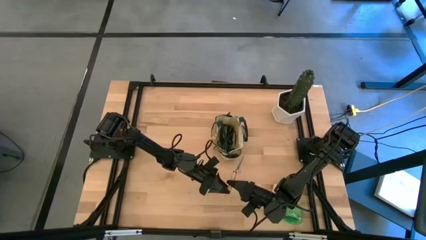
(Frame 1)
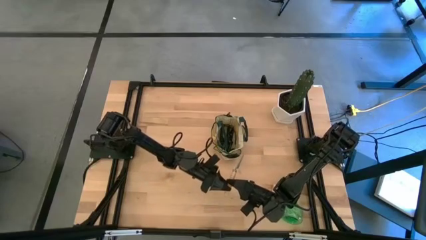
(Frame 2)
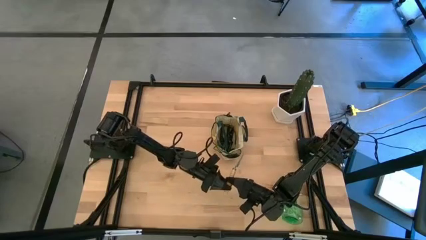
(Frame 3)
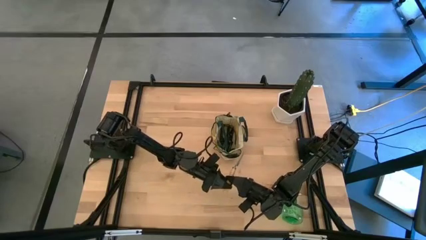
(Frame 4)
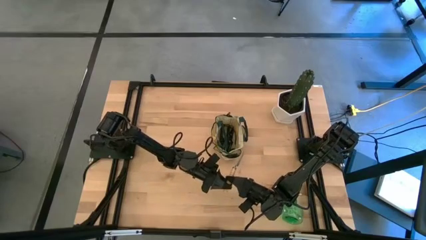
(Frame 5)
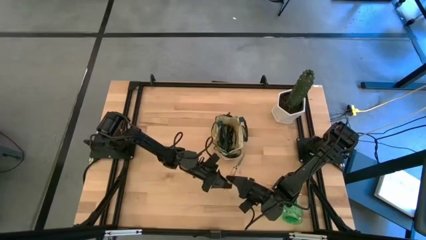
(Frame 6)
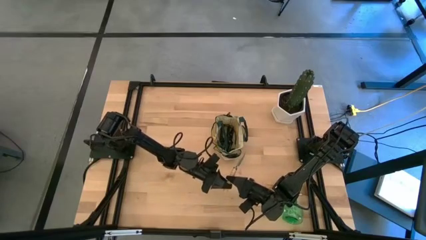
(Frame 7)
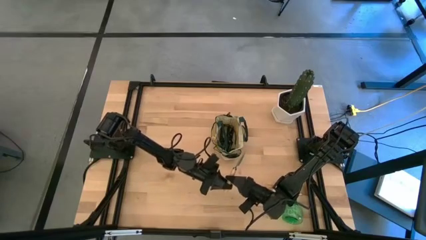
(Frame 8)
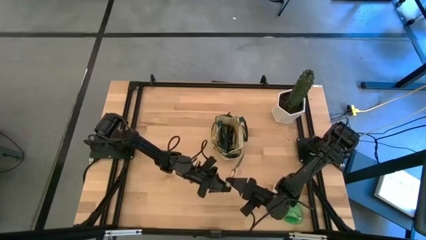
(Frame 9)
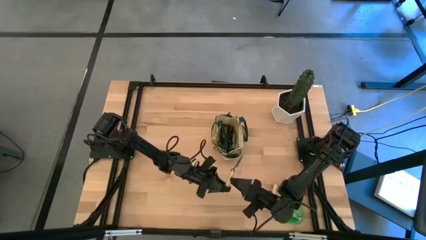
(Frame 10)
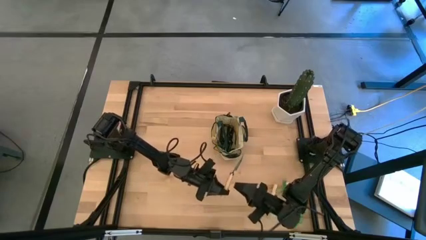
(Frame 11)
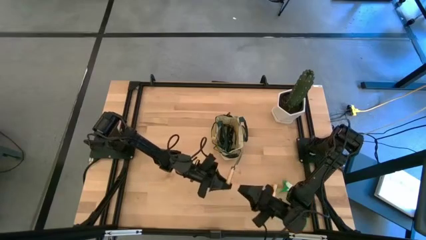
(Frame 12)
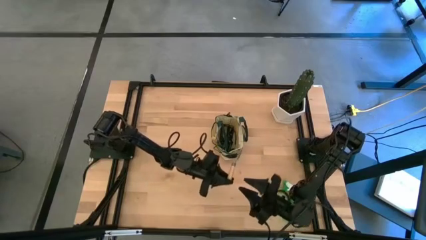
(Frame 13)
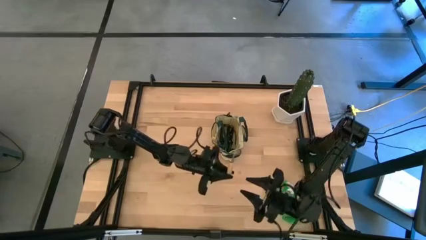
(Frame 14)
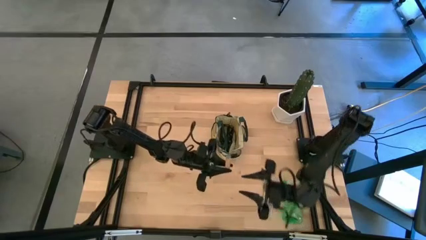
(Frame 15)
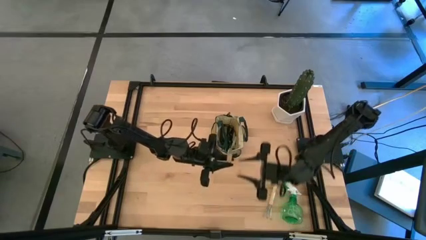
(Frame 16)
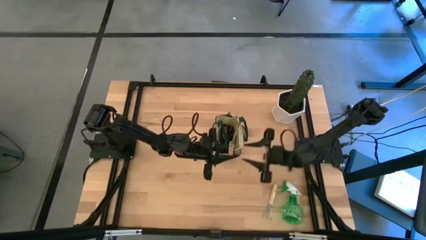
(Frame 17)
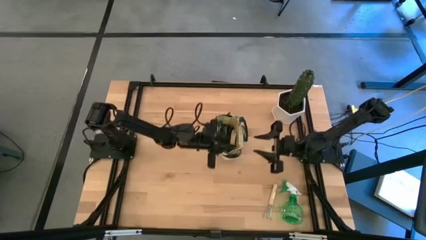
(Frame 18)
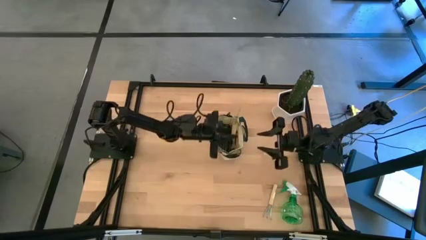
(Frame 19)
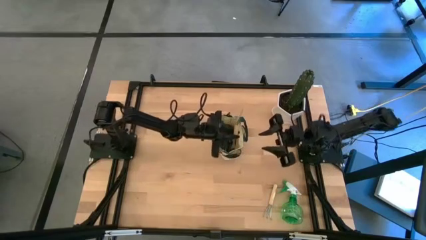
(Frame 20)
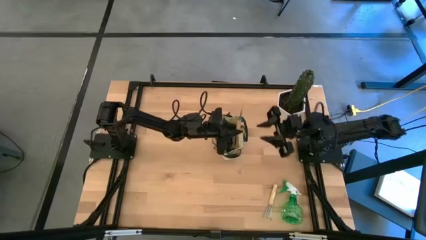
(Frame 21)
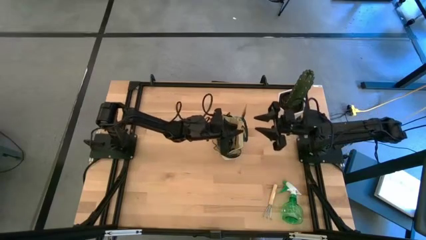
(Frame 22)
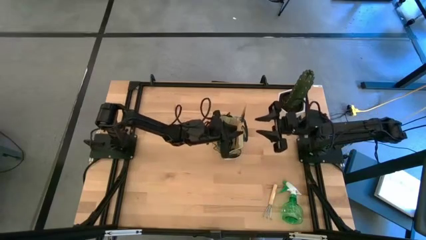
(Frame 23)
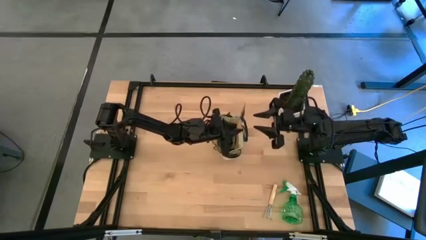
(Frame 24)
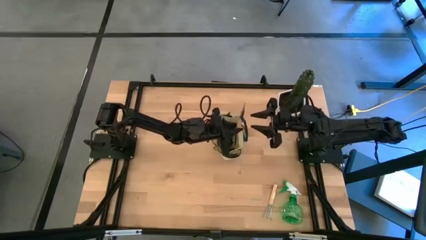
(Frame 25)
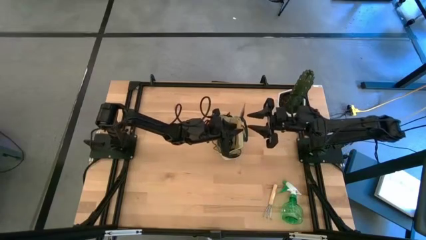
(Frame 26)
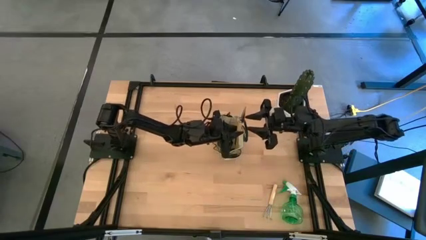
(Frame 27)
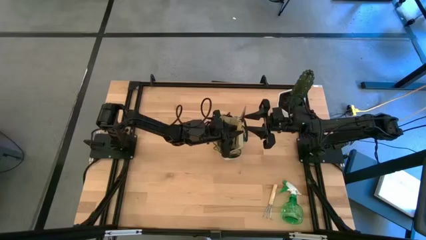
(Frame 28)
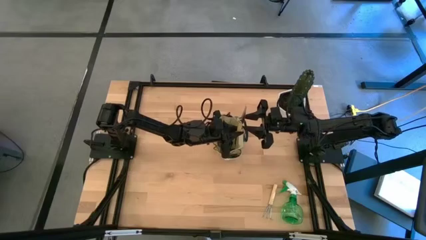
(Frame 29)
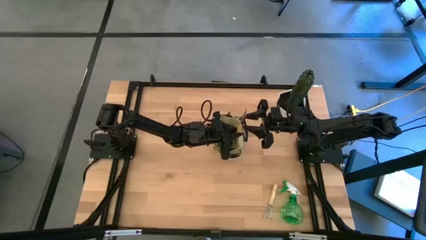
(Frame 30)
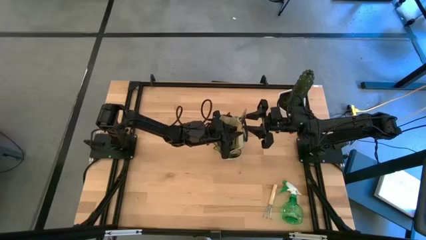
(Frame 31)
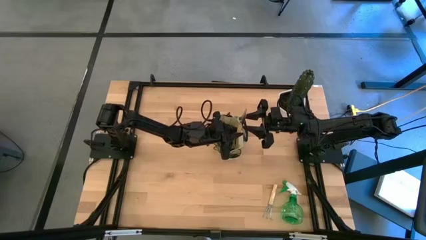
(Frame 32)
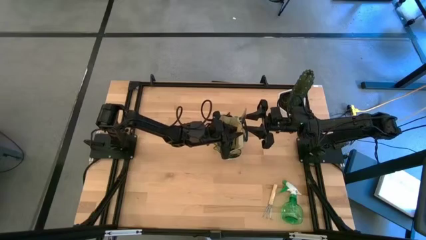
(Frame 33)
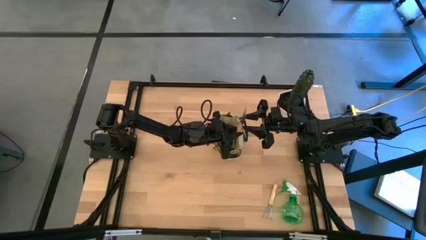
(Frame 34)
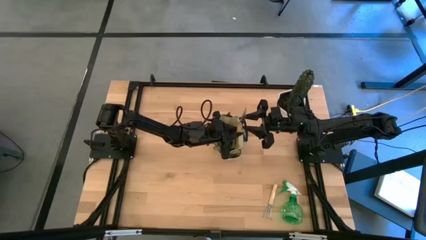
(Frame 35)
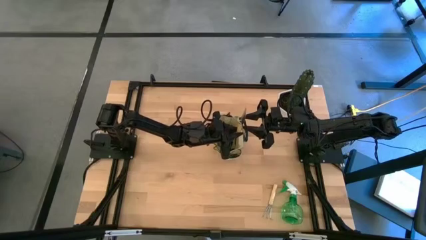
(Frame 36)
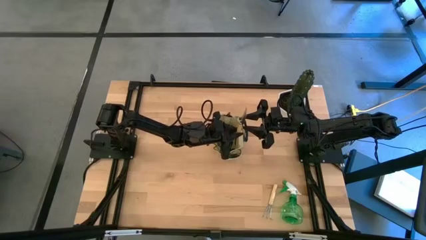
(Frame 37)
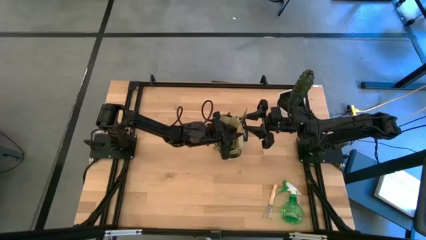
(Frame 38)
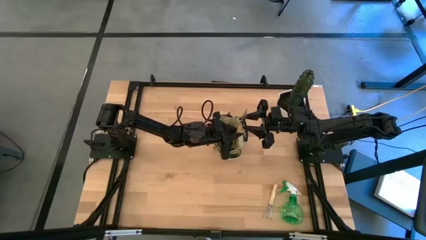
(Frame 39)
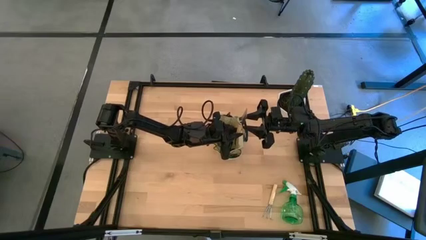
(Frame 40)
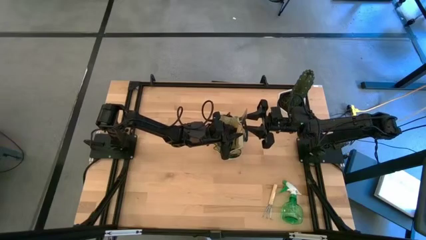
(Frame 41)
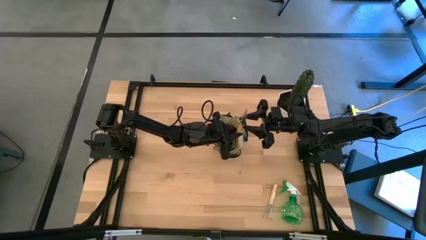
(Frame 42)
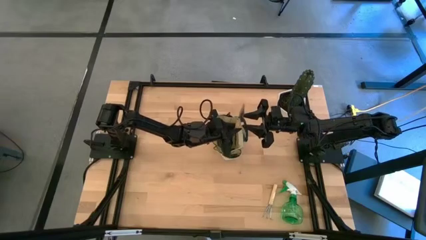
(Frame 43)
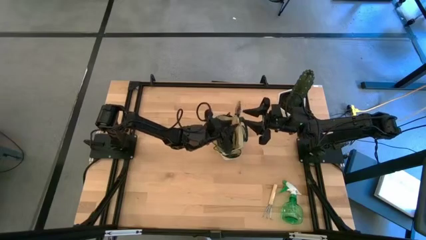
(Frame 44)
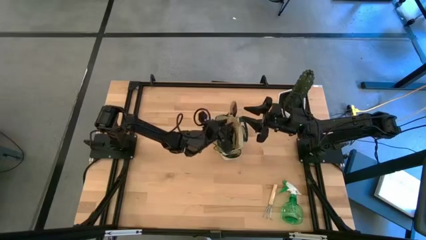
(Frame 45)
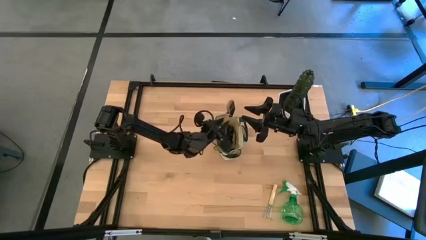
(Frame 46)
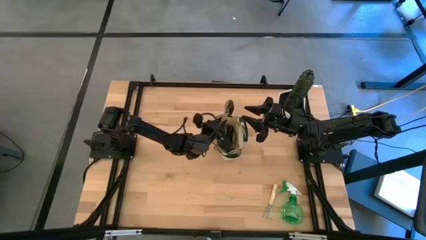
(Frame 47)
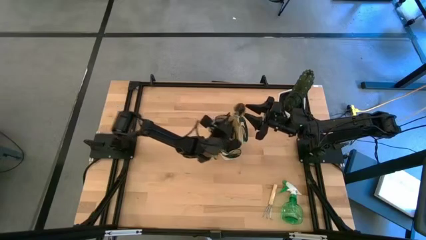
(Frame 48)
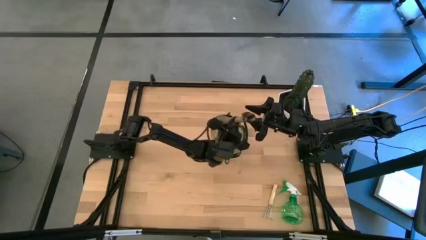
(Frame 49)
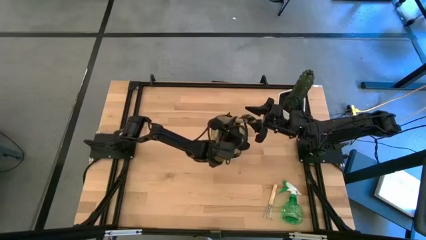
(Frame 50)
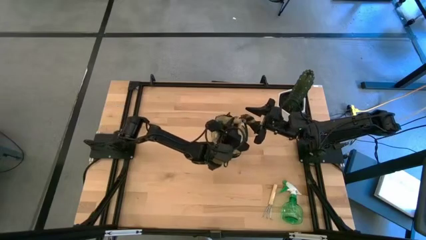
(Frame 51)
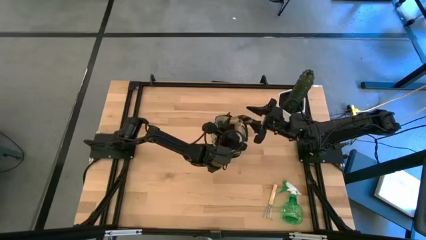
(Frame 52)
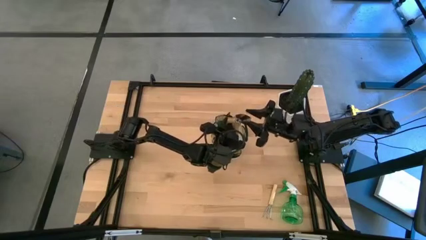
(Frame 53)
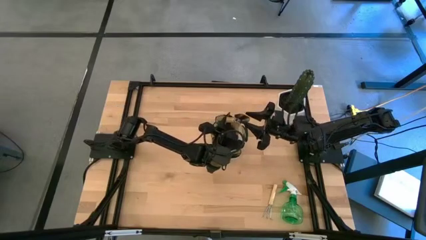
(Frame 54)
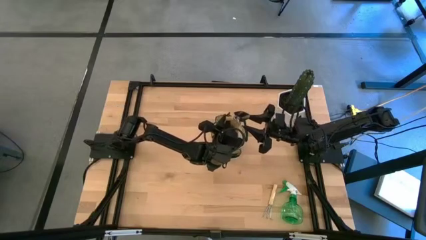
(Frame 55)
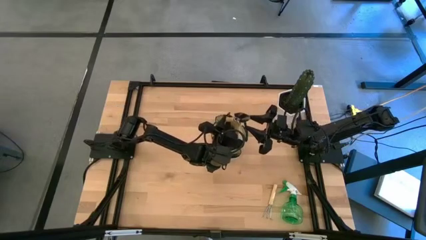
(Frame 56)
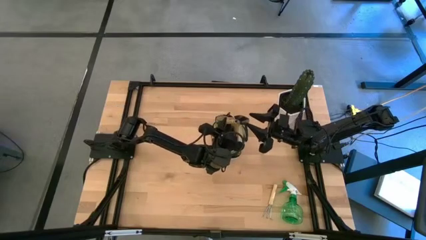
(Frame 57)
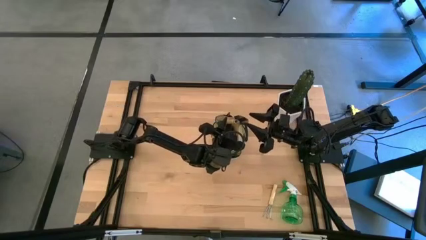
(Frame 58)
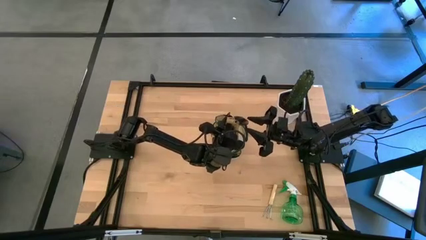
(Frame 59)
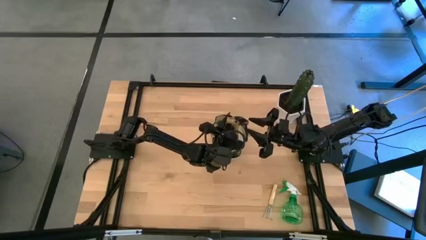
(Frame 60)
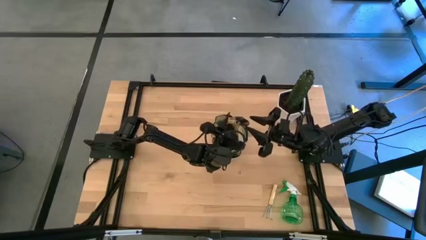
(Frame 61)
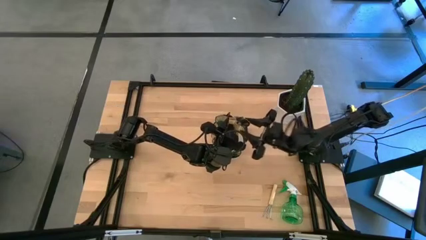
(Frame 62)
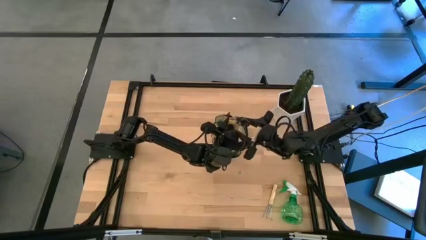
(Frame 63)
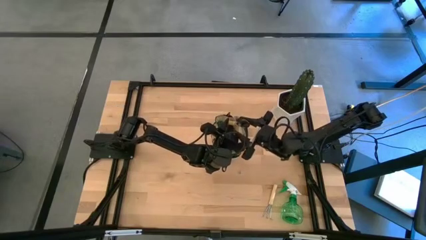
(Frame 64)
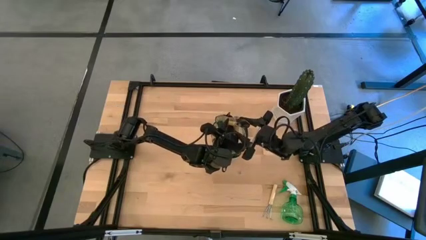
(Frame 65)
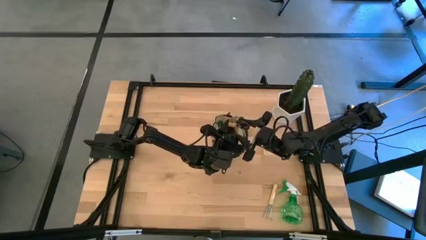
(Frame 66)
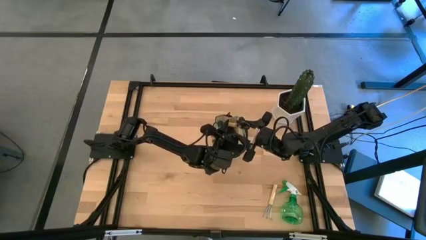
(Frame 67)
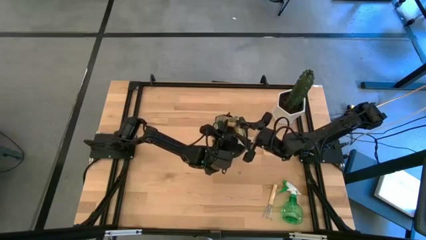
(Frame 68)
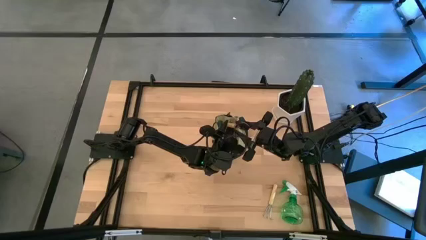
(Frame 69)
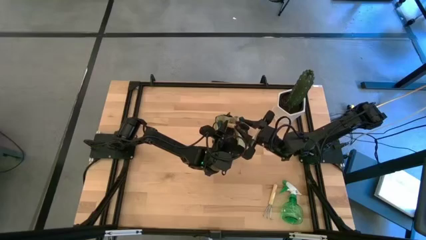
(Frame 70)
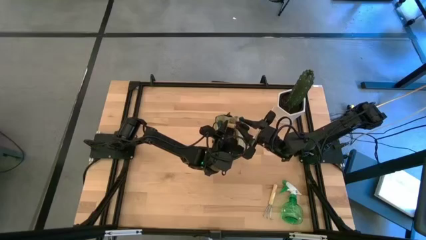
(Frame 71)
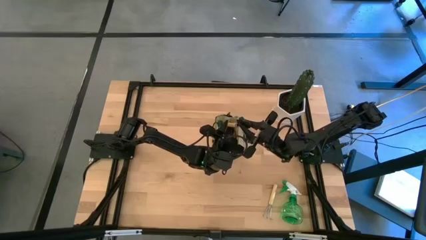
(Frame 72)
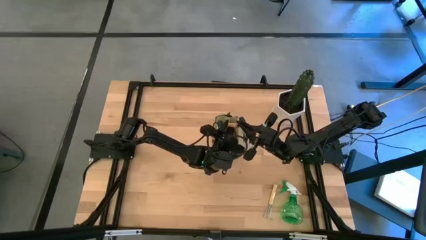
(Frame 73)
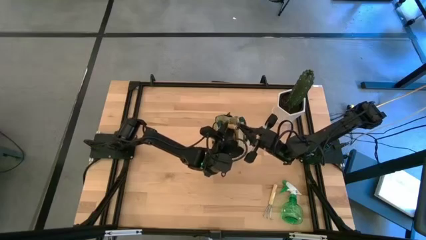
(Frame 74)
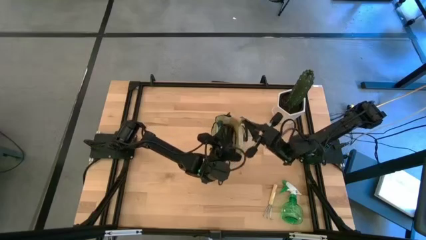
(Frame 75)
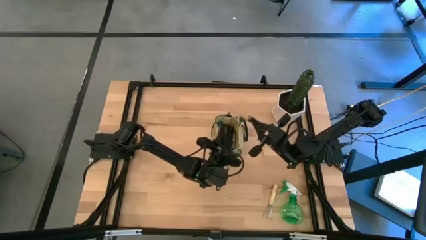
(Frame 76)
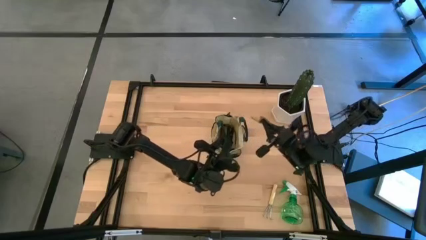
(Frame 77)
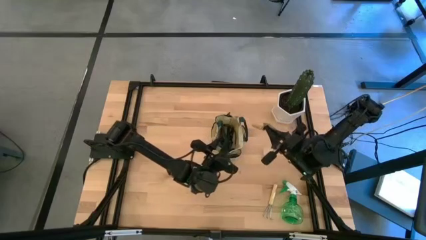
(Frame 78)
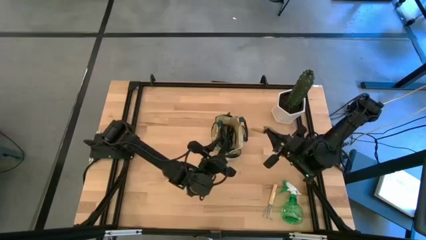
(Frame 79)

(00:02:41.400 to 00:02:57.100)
Task: Pick & Place Garden tools in Gardening bag
Put the brown trowel into the green gardening bag
